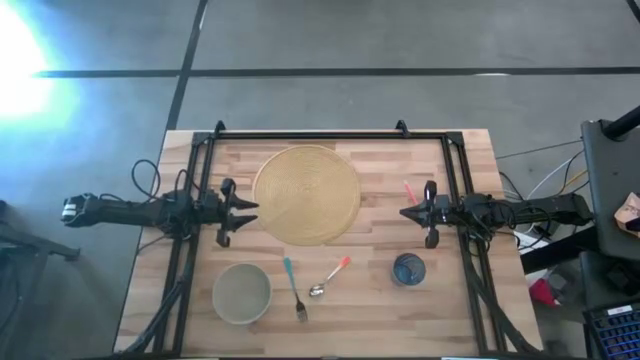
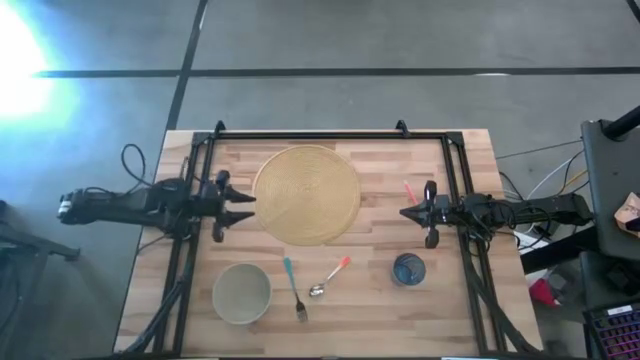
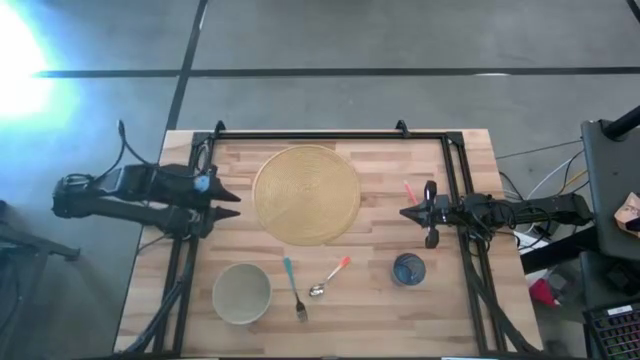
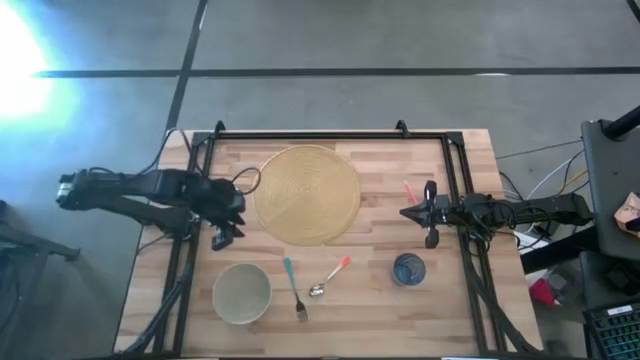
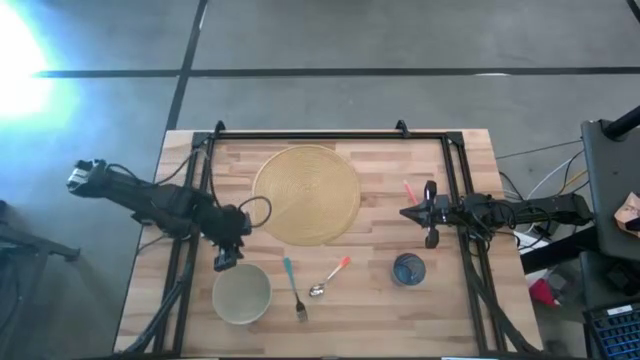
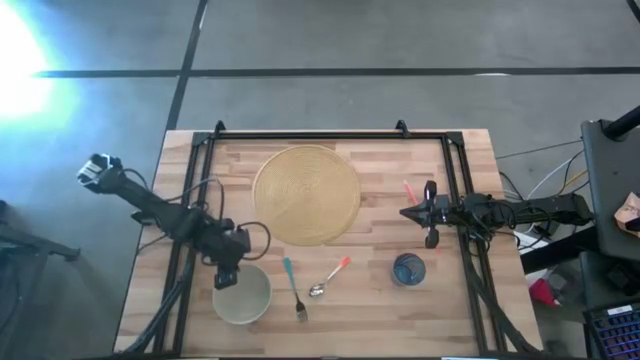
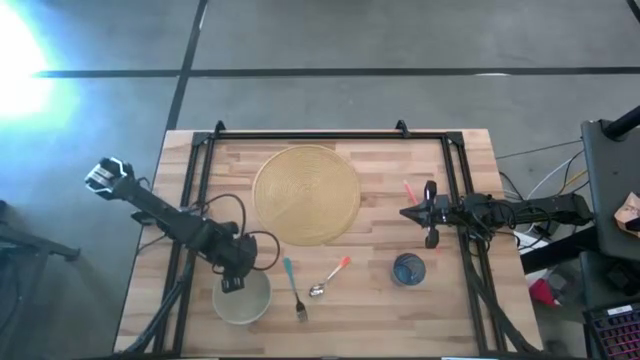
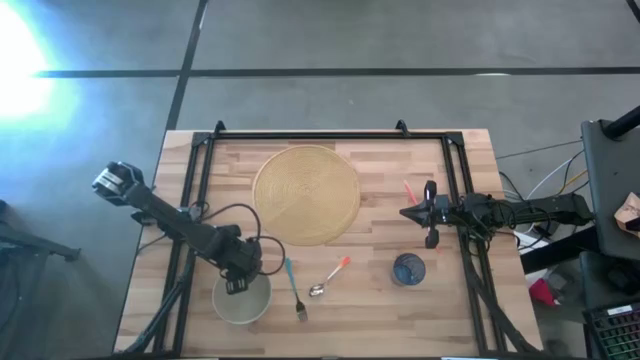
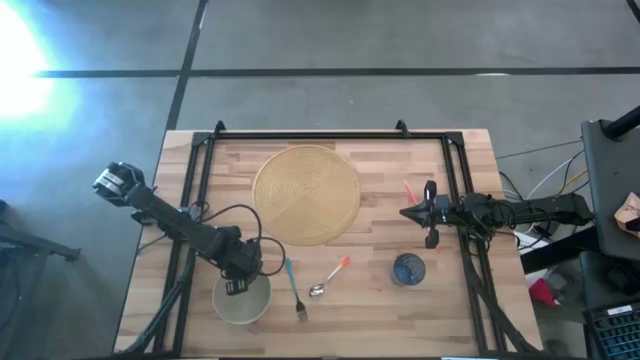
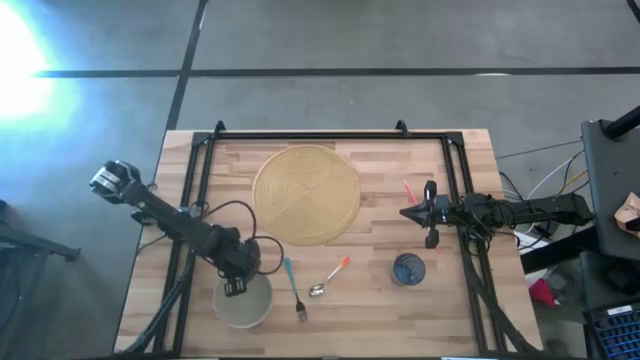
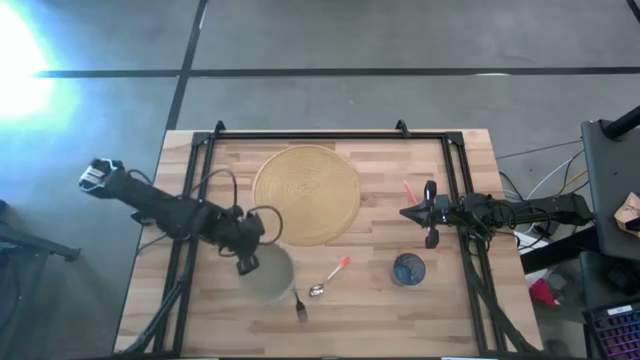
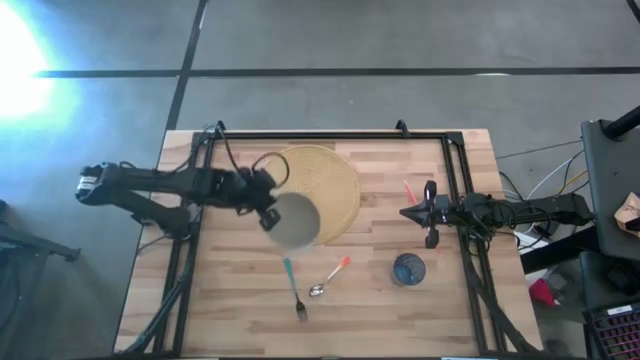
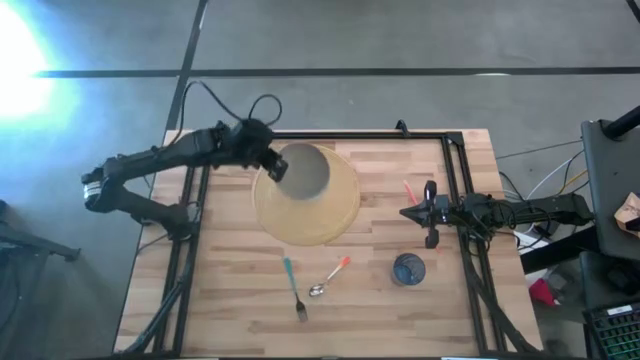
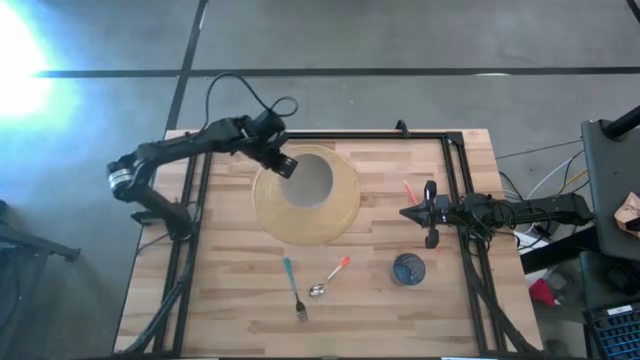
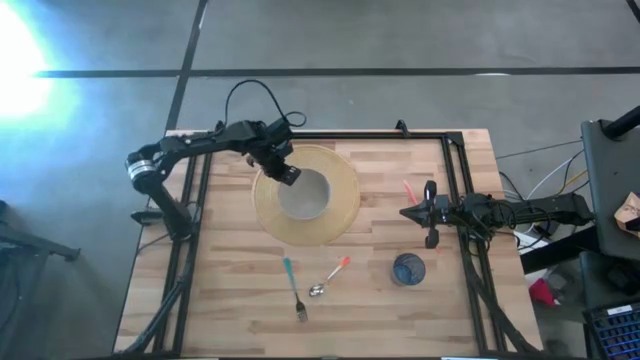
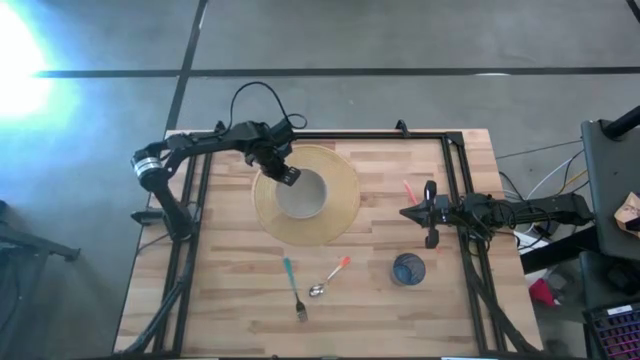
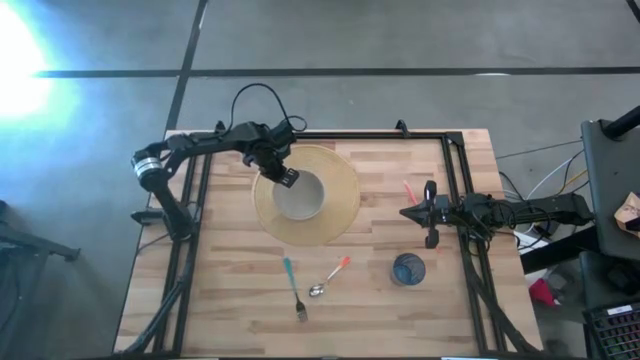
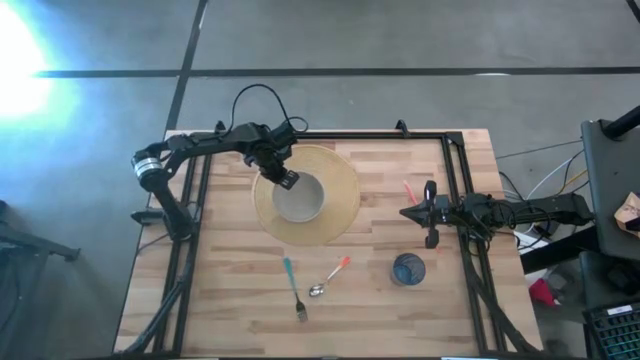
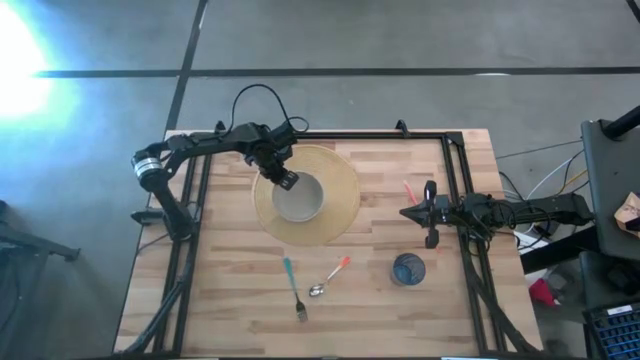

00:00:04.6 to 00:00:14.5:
Task: Pick & Place Utensil
Put the gray bowl on the brown mat

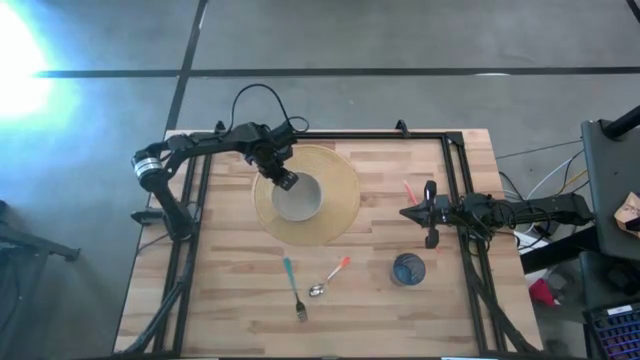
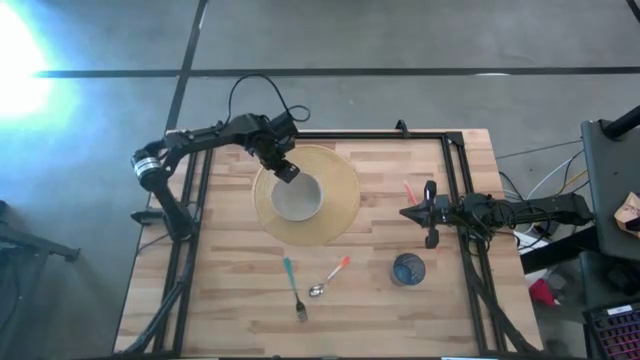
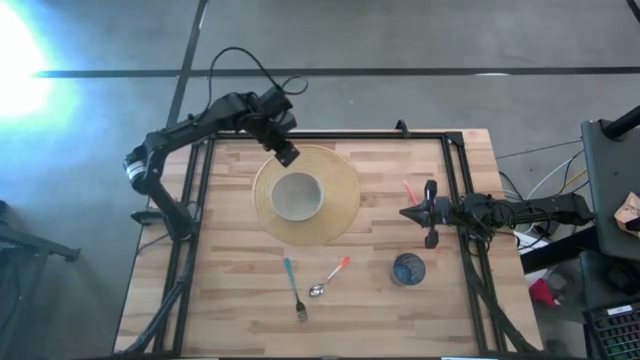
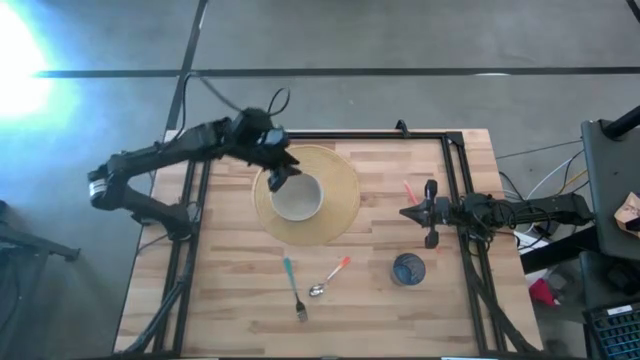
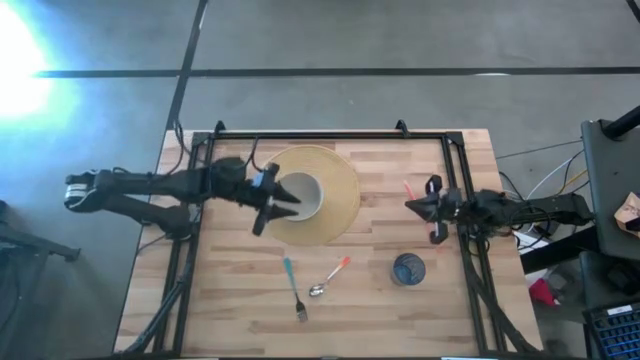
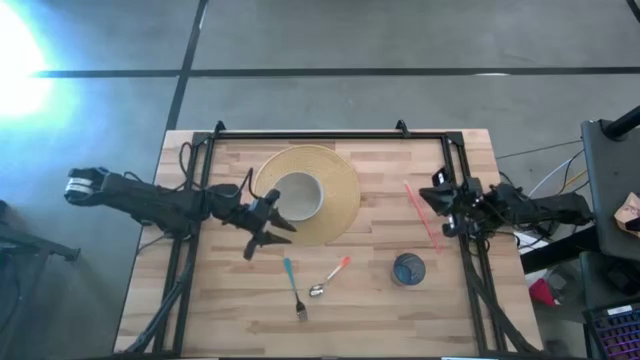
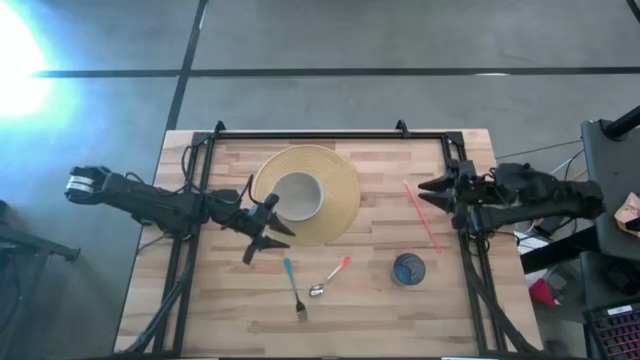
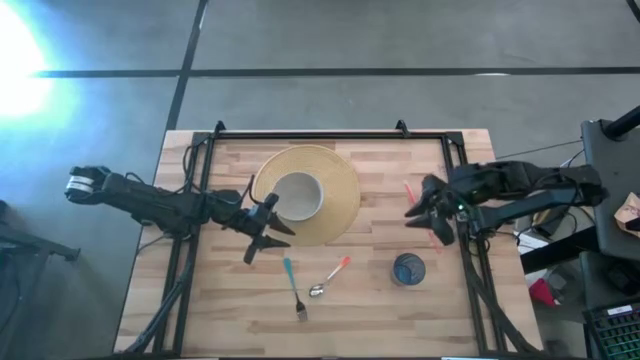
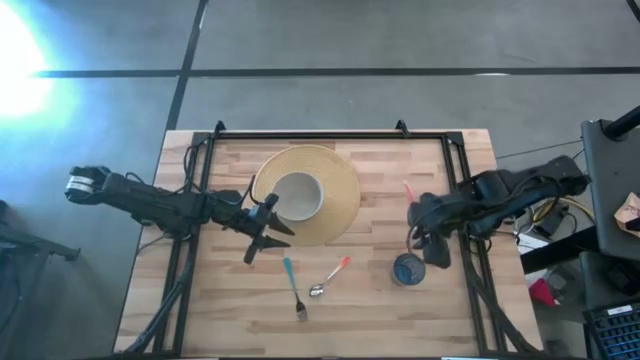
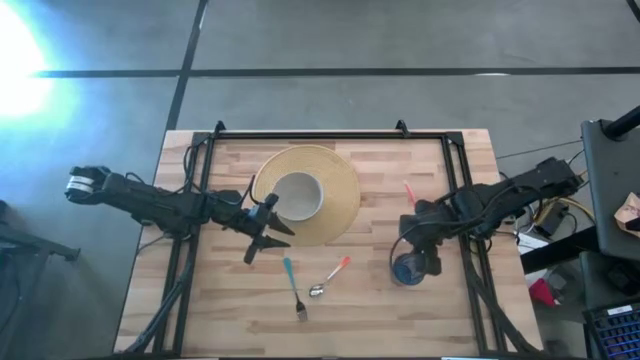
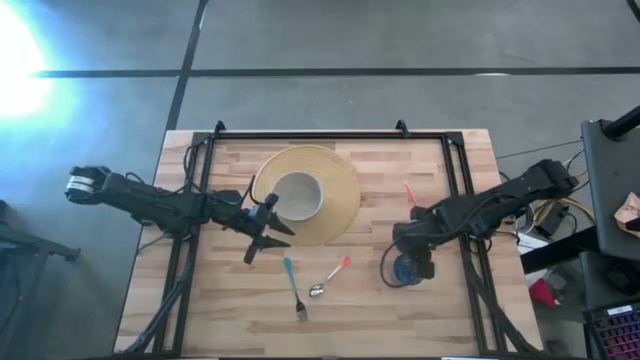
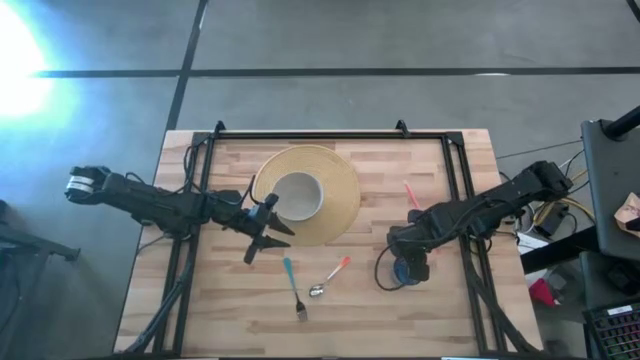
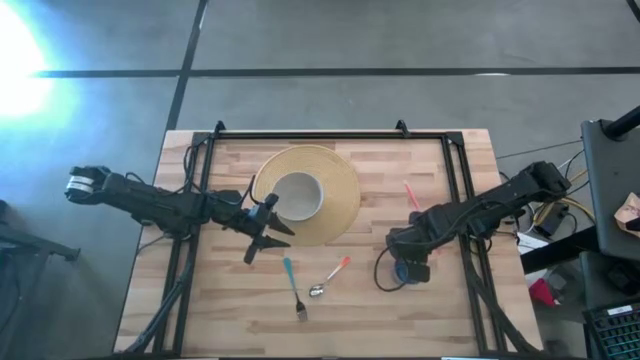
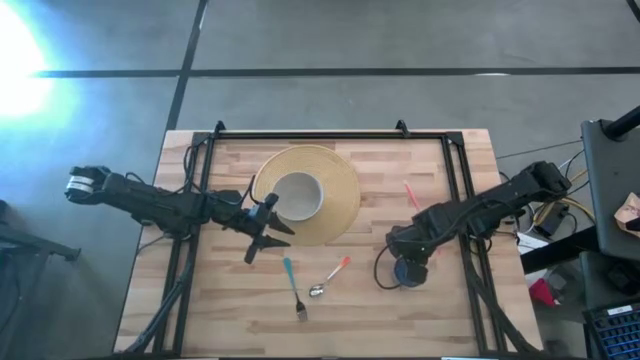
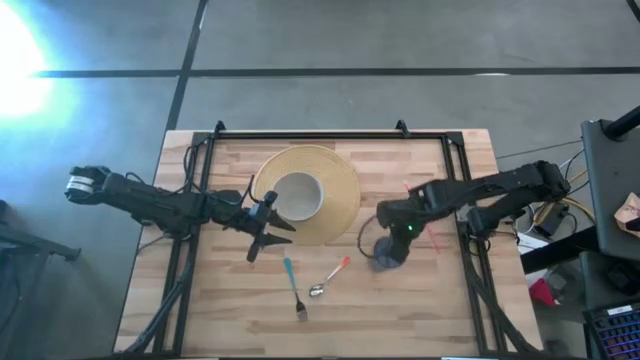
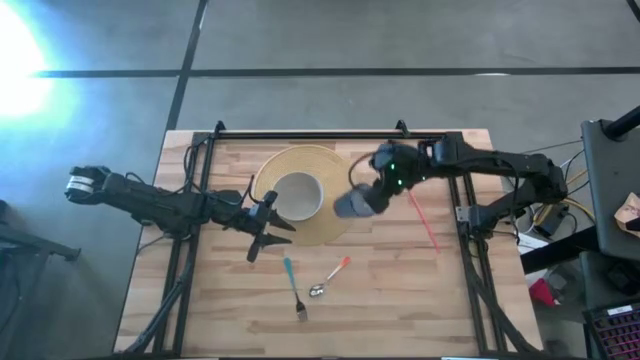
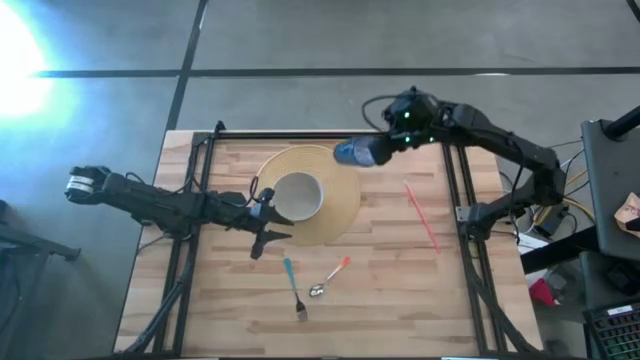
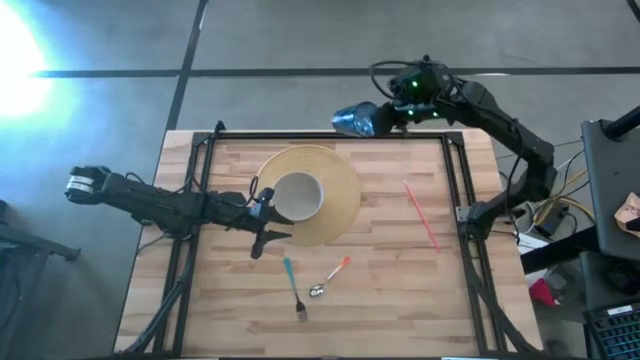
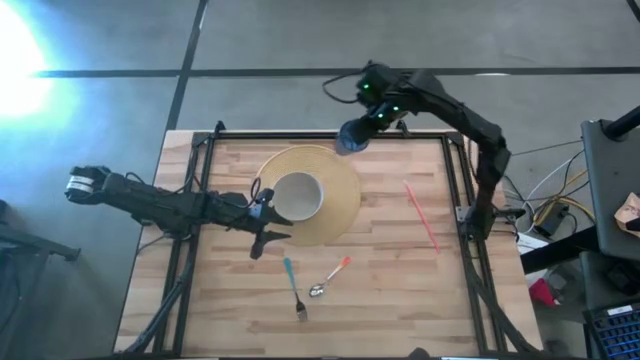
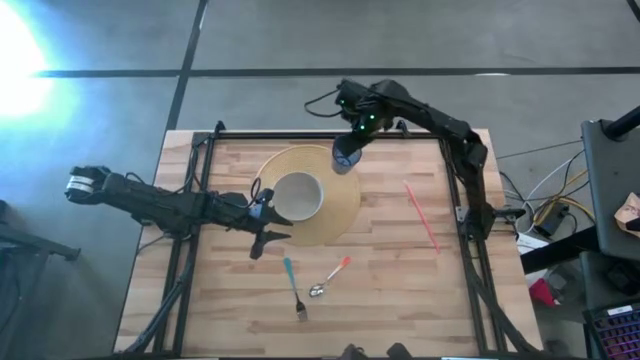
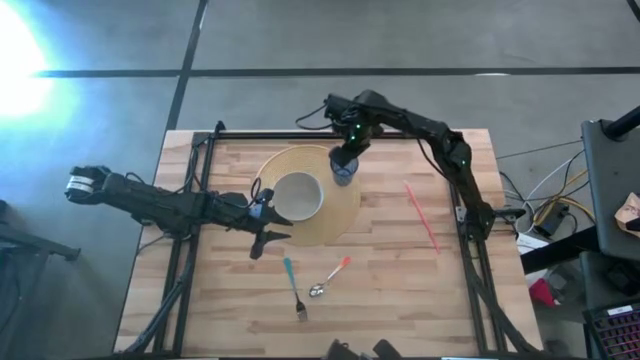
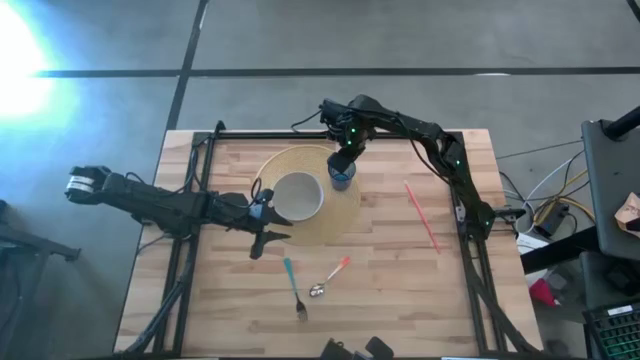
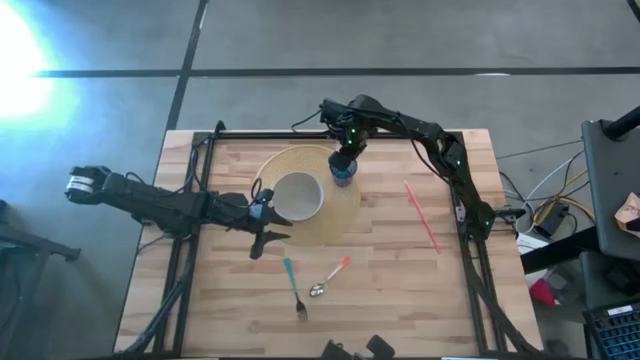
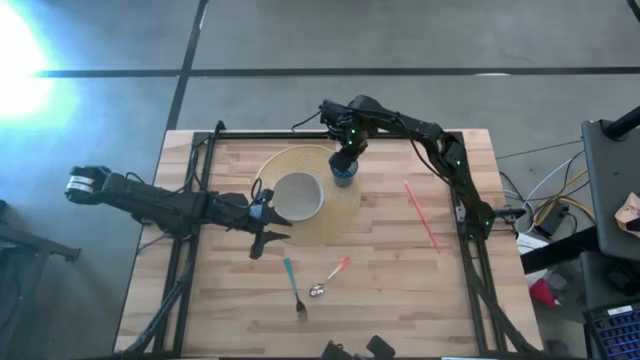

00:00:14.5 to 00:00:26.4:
Put the blue cup on the brown mat to the top right of the gray bowl
